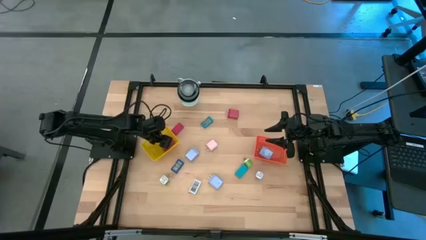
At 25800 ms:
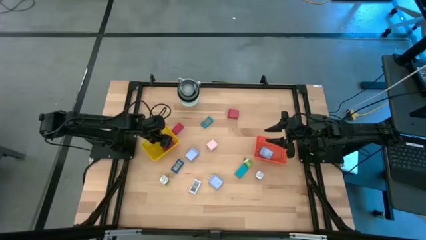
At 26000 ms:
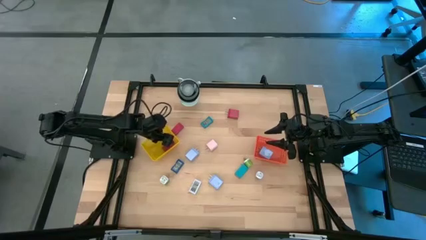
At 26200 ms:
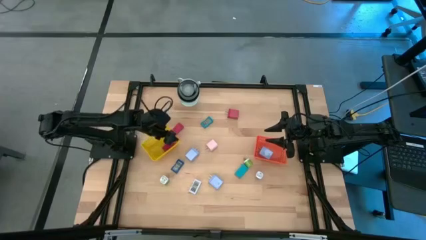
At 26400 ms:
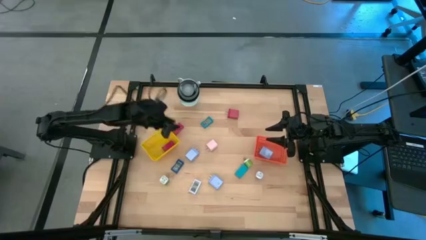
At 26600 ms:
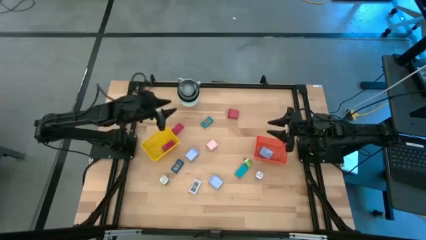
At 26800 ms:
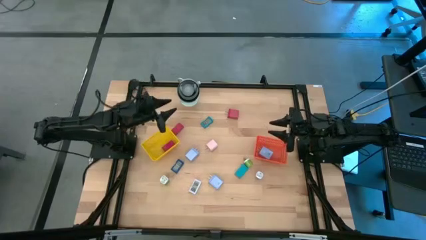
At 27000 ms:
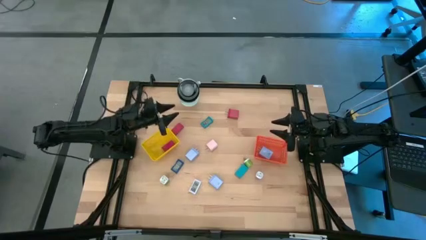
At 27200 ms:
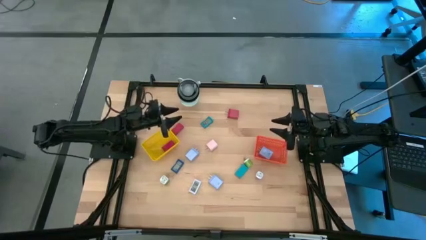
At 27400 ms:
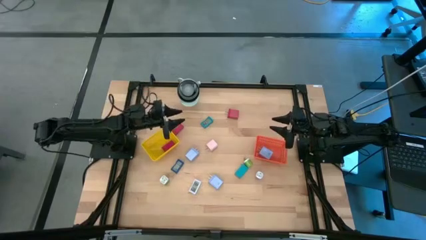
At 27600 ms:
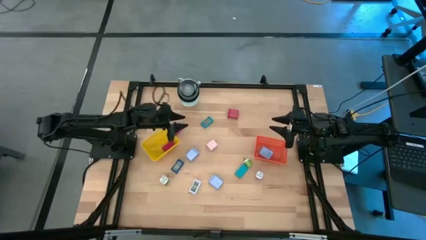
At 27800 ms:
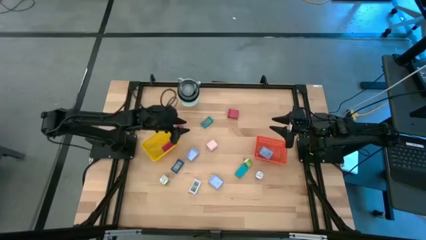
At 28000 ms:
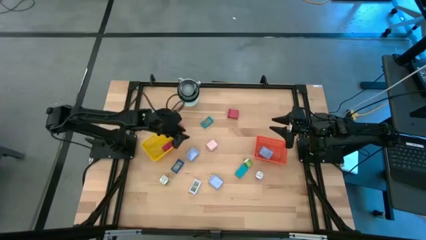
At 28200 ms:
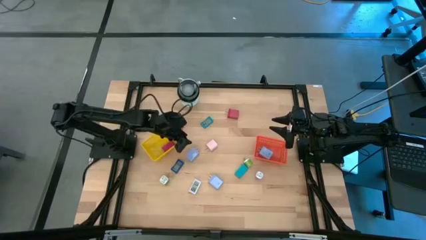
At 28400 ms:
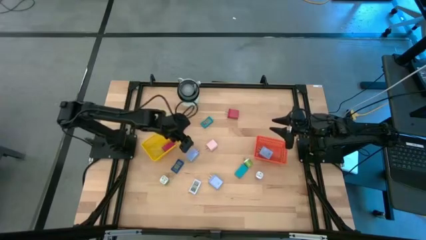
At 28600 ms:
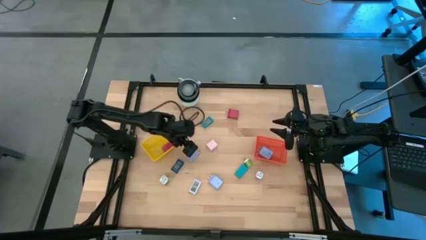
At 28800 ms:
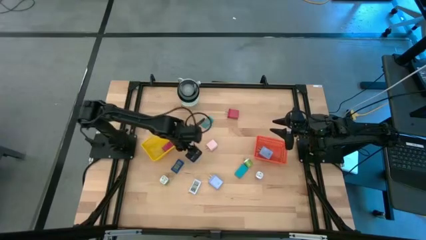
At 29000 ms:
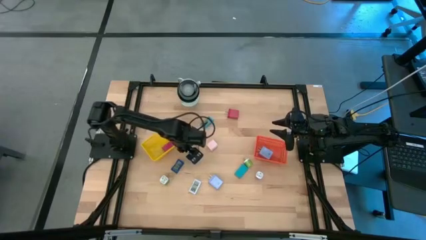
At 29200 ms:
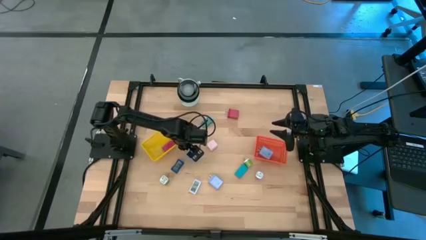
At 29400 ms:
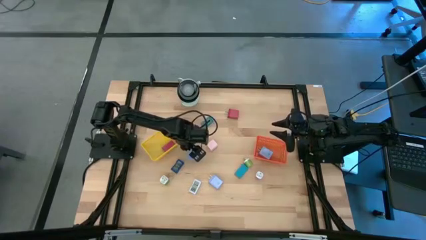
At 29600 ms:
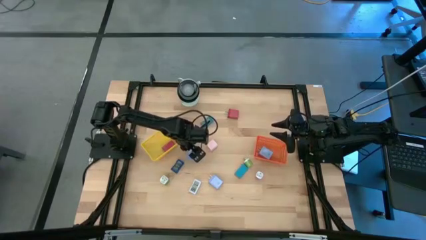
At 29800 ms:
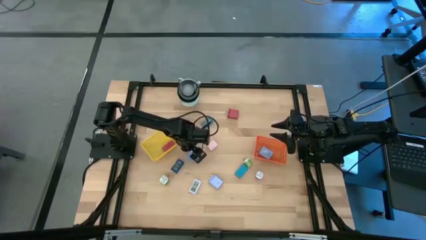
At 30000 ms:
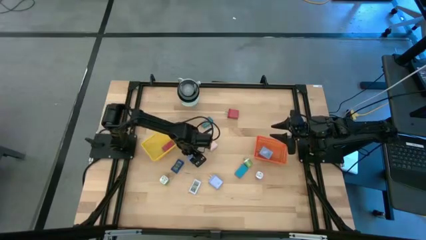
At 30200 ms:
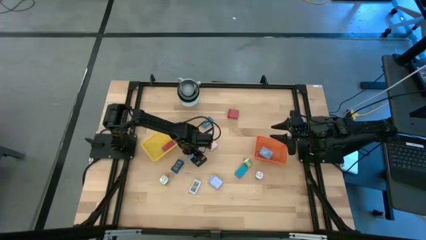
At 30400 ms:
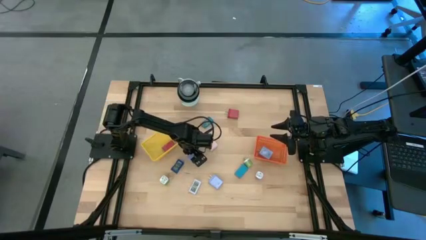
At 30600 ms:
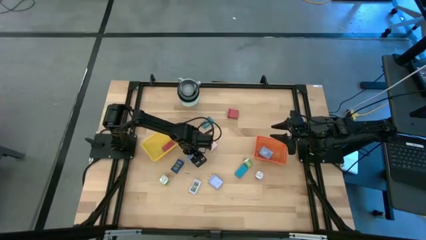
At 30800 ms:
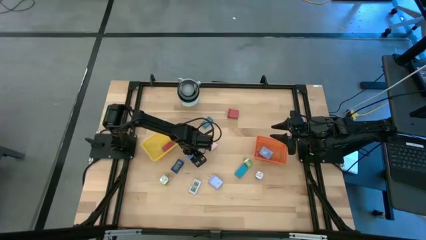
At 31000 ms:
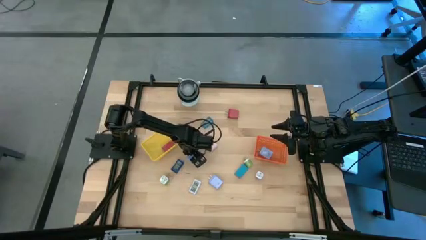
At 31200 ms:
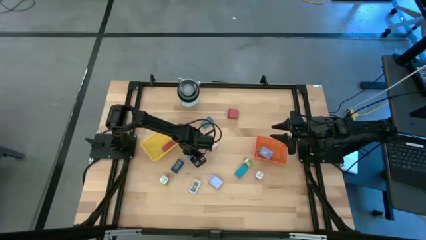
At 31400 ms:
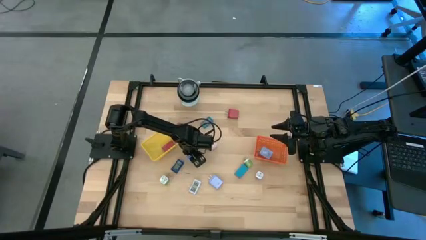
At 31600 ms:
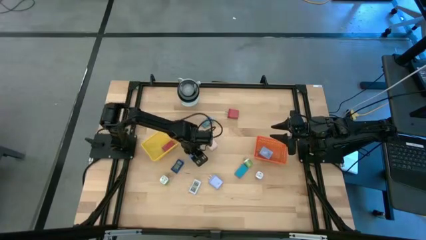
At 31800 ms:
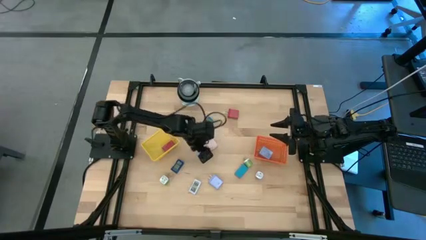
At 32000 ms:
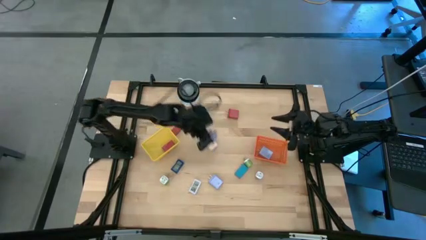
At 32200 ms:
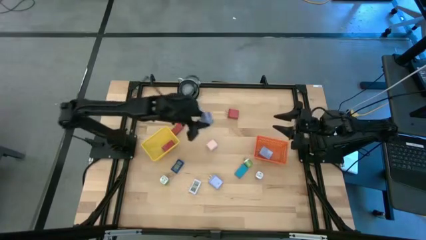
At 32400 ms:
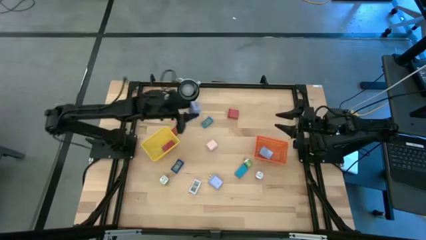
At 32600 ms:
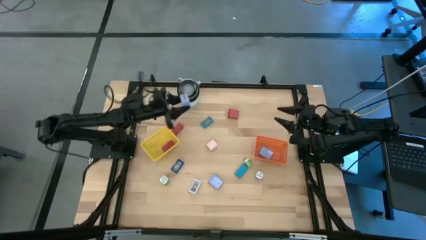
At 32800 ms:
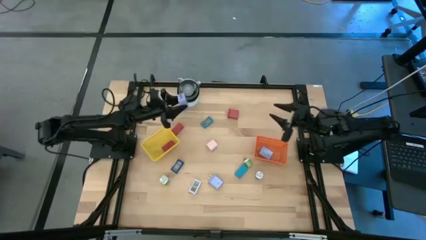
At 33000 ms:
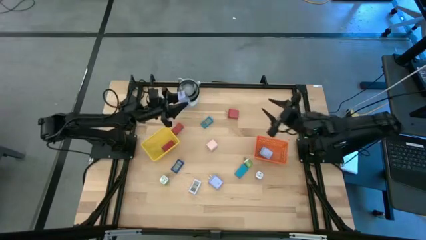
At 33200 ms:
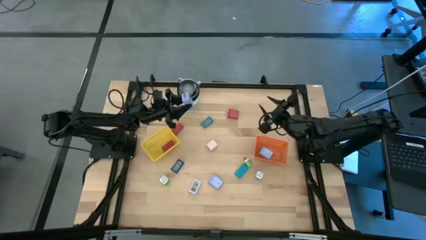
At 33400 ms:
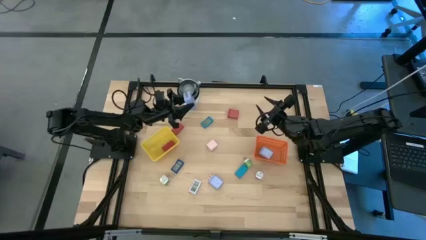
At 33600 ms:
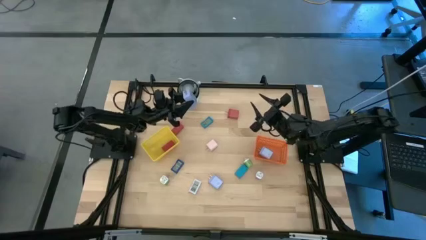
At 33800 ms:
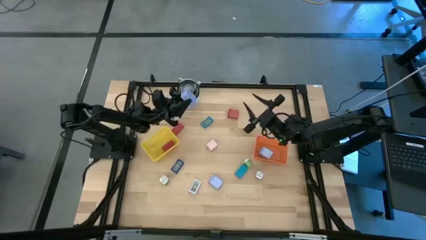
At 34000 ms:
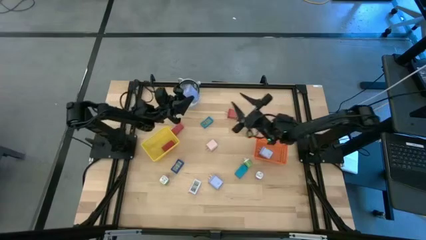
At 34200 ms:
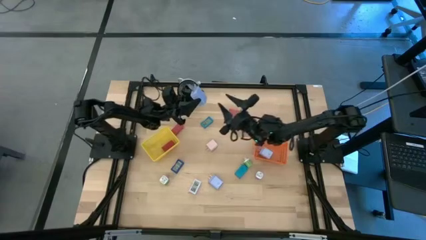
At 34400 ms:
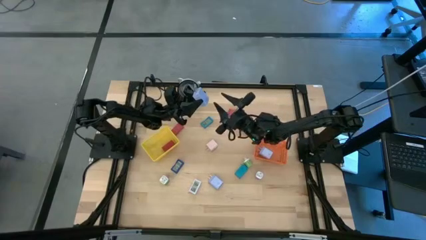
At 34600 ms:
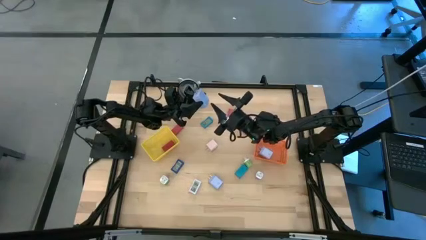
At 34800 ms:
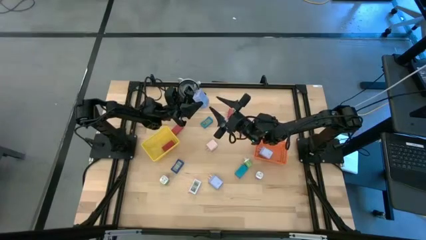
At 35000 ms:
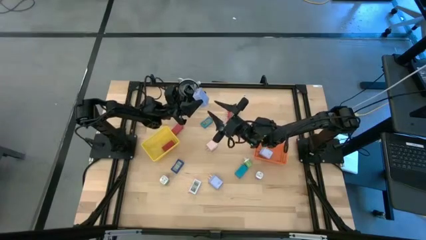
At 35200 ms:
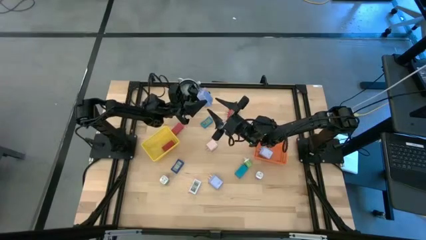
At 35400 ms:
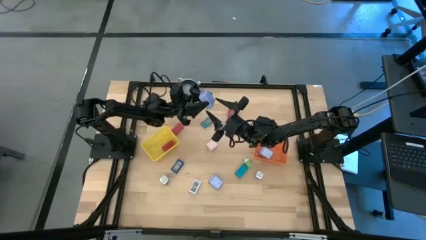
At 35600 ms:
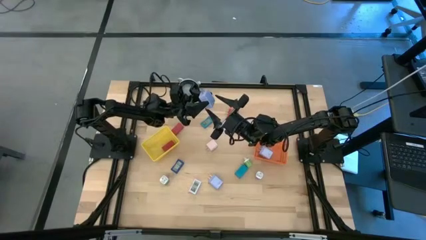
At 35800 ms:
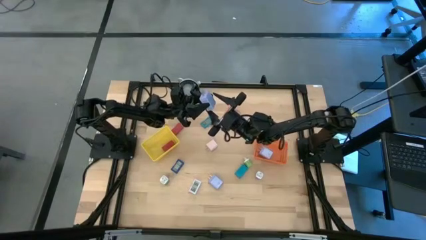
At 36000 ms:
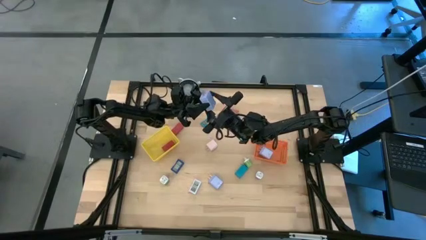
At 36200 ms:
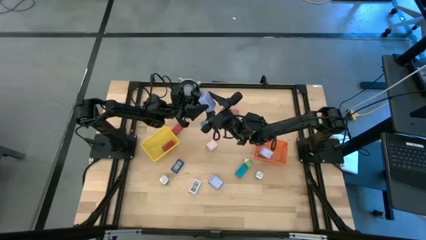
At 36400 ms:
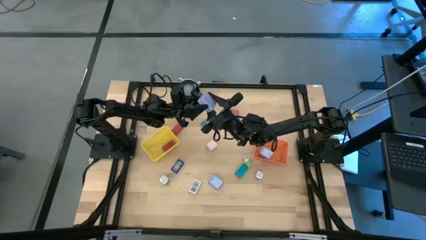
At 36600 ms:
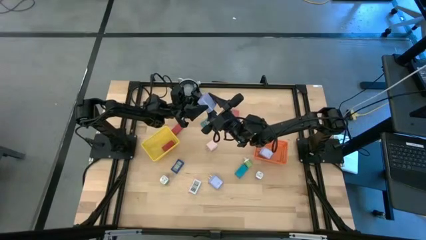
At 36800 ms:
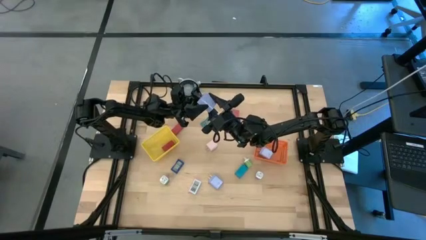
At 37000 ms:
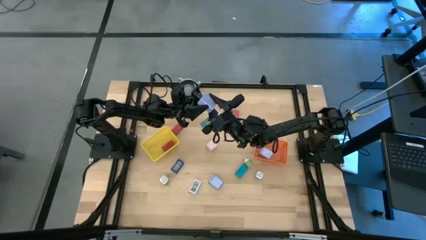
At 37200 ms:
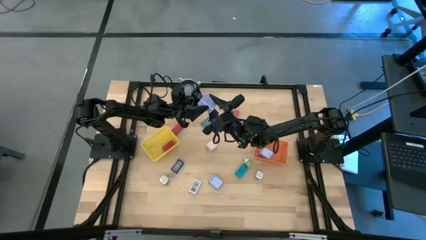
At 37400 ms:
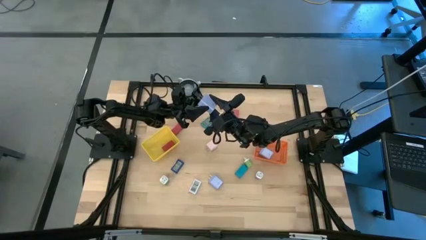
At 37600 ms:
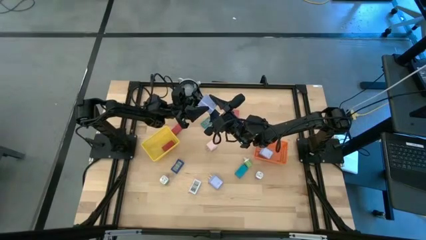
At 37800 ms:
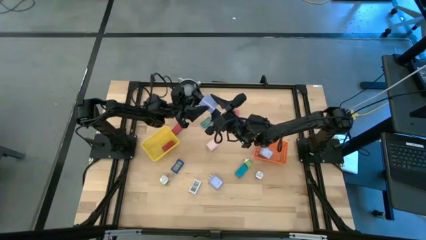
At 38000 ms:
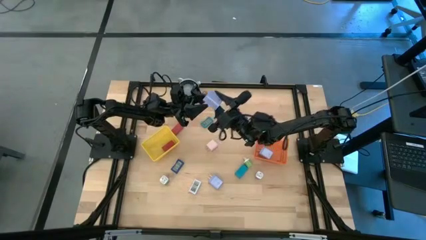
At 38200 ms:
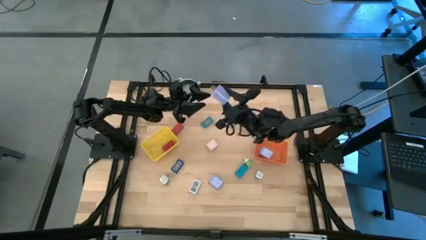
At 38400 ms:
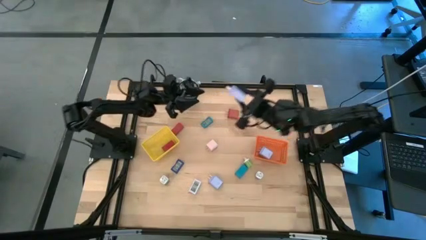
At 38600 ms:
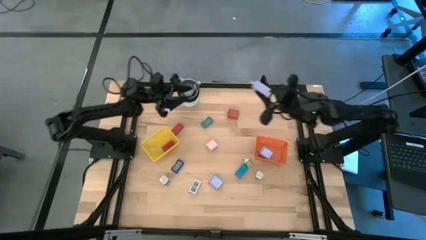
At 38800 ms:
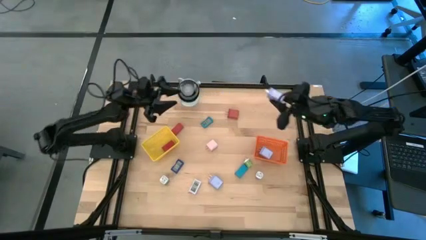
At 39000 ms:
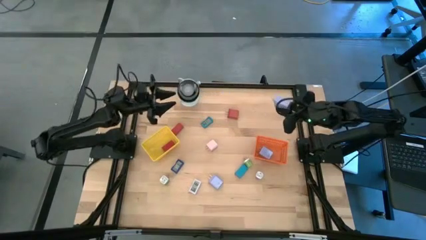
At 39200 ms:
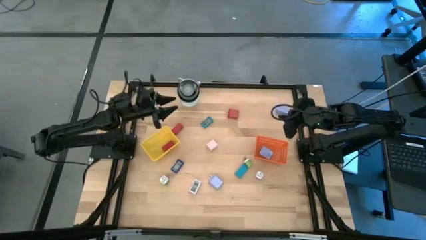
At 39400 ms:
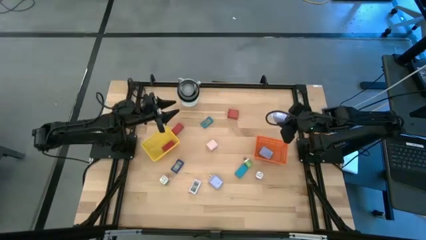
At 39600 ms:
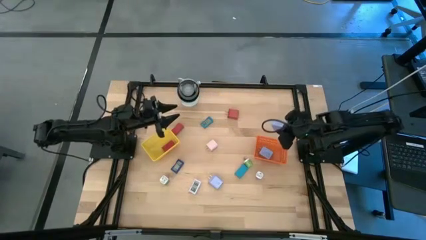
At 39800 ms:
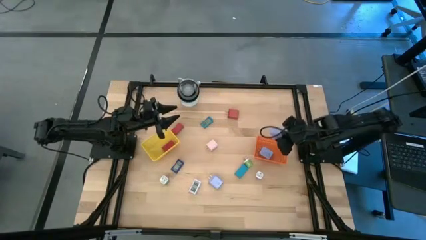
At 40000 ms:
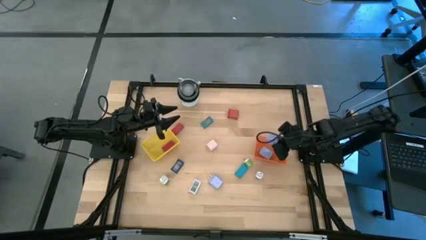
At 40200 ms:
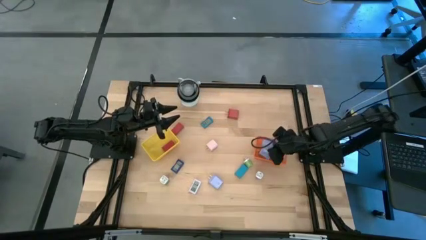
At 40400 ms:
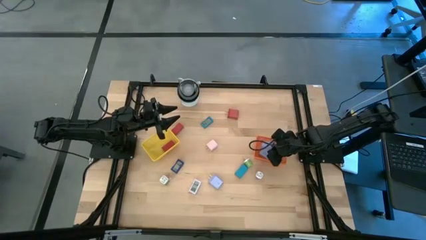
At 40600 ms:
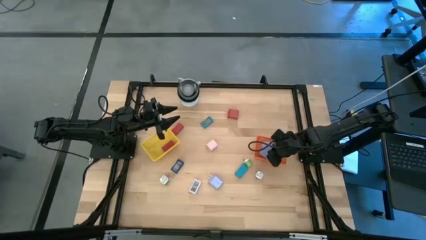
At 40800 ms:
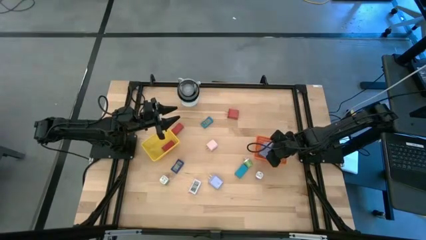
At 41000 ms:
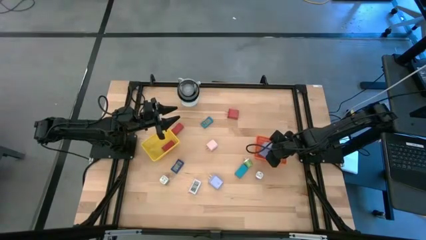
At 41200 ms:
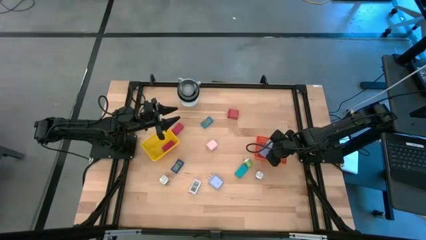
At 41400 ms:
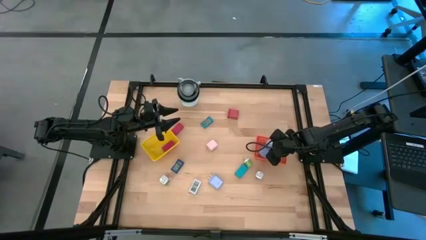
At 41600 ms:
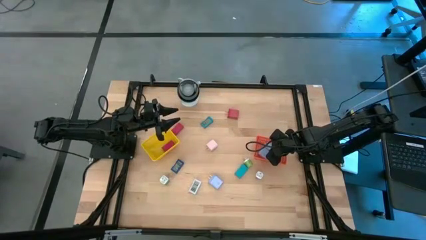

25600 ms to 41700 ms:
Task: Pick & Place Office items
Put the top blue charger adapter into the orange basket
